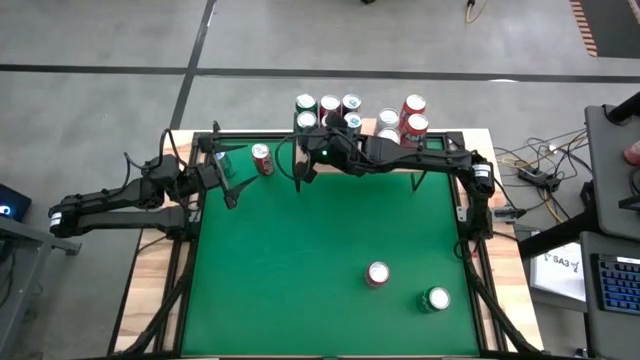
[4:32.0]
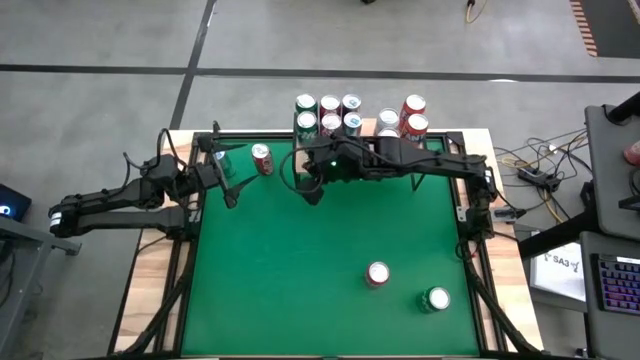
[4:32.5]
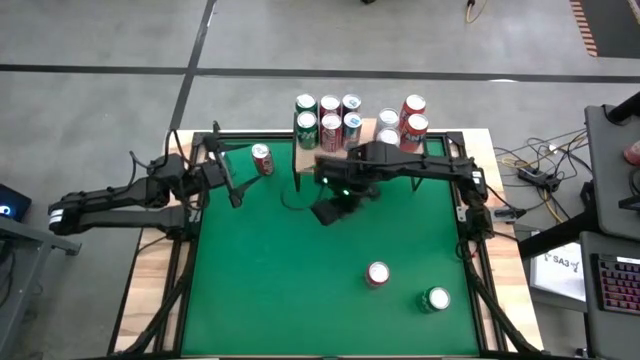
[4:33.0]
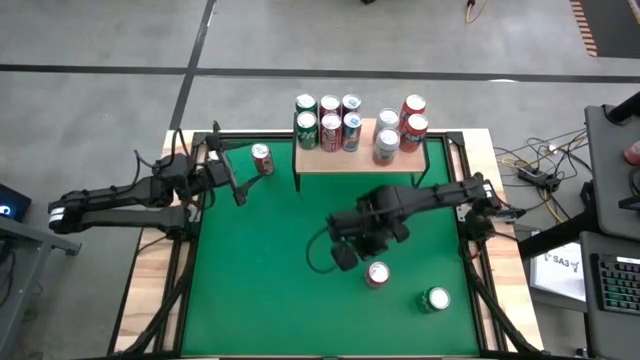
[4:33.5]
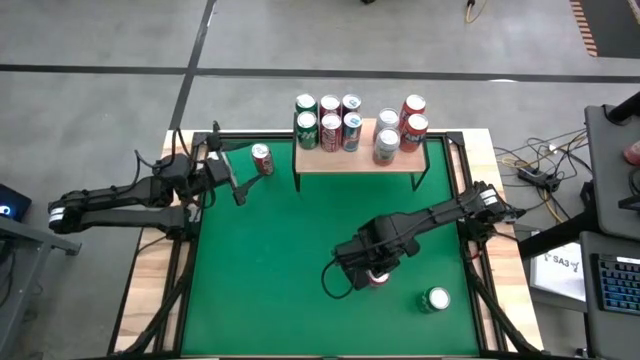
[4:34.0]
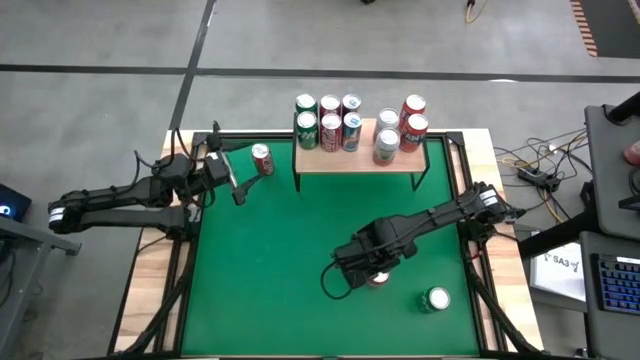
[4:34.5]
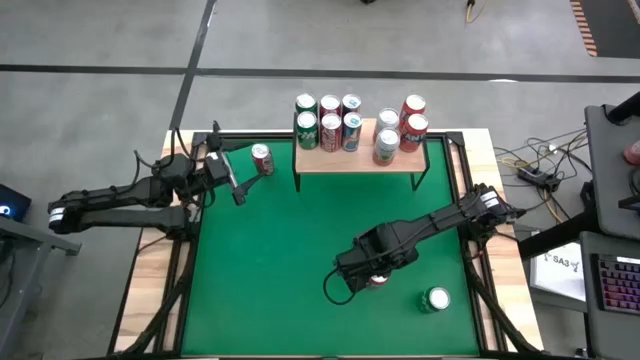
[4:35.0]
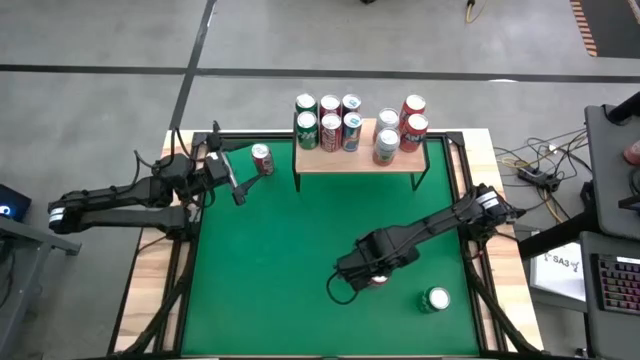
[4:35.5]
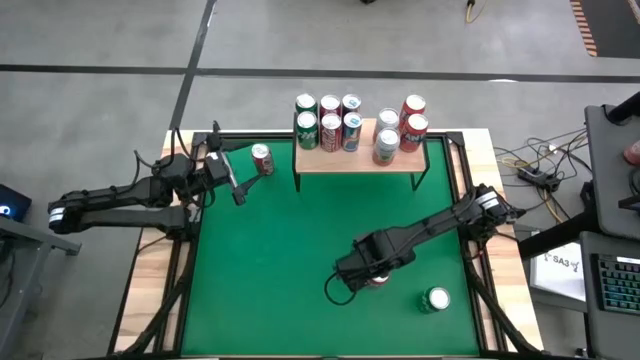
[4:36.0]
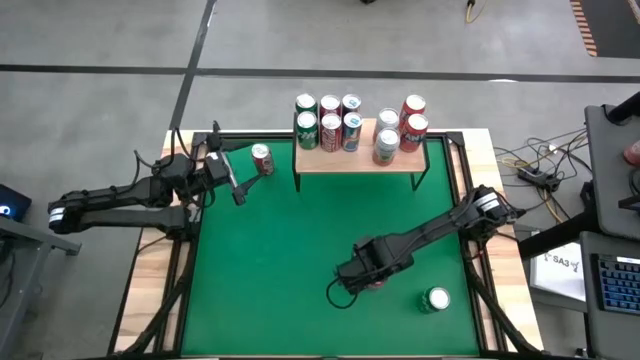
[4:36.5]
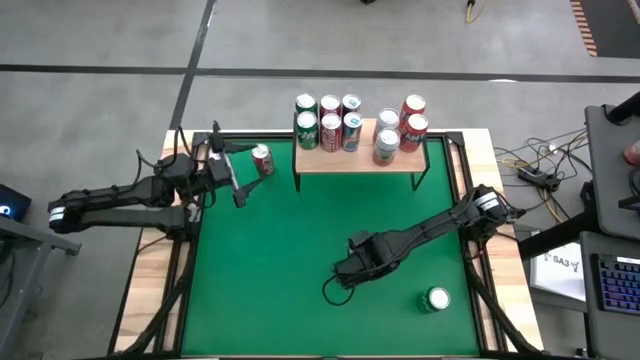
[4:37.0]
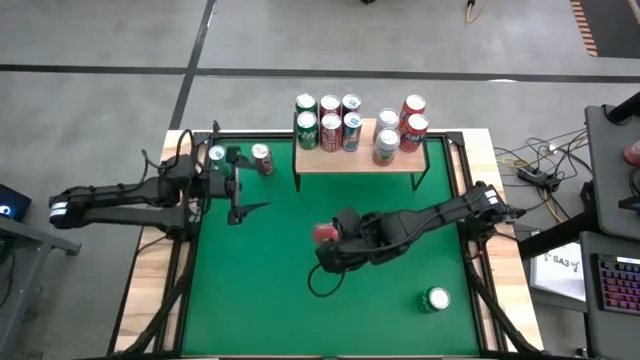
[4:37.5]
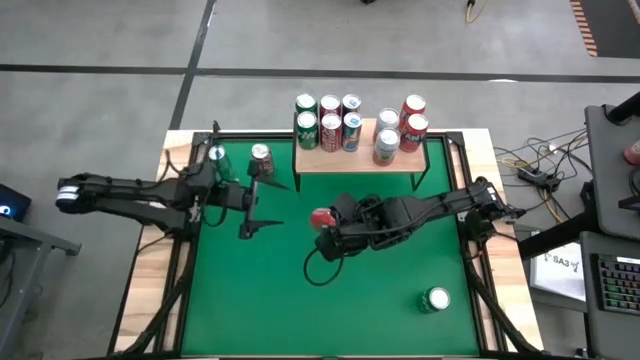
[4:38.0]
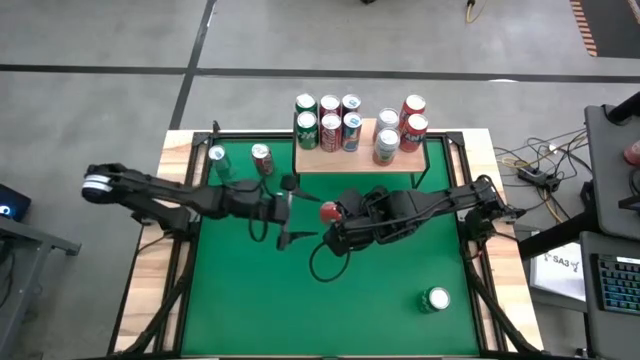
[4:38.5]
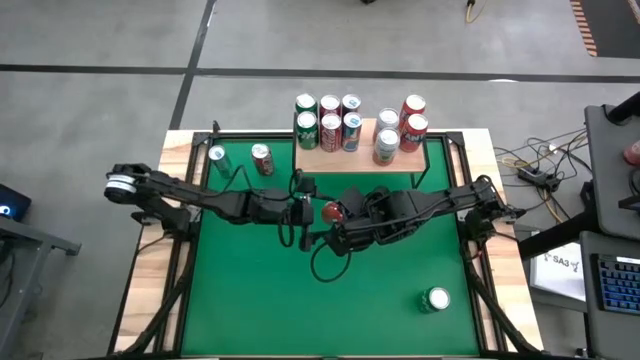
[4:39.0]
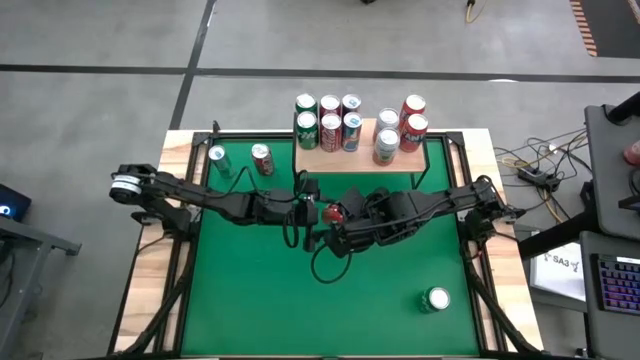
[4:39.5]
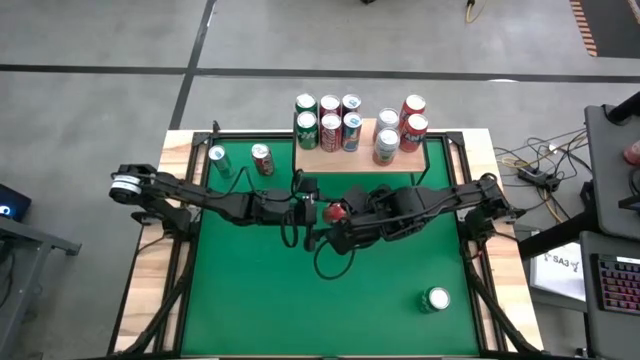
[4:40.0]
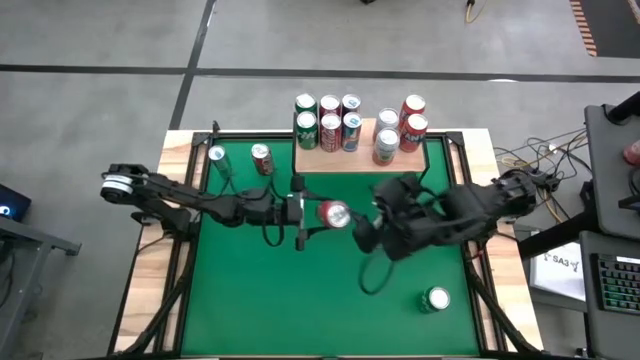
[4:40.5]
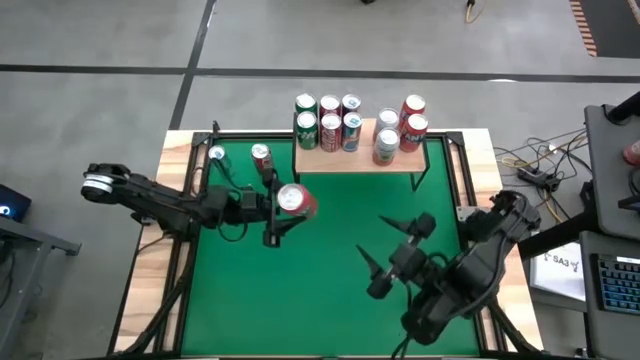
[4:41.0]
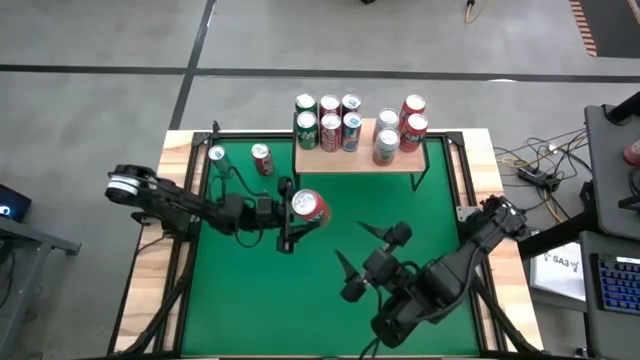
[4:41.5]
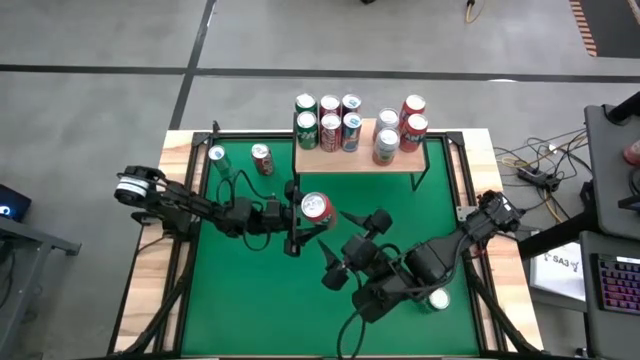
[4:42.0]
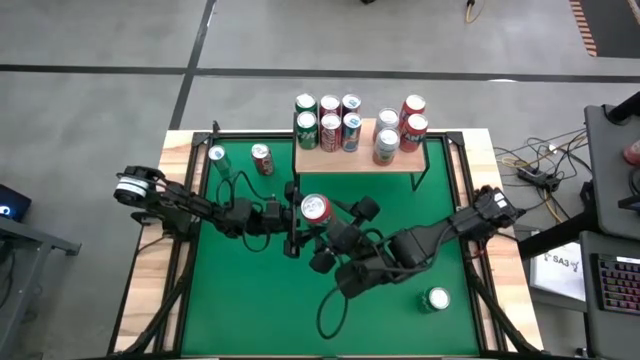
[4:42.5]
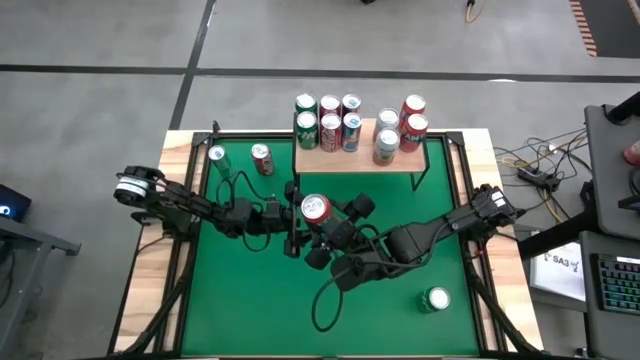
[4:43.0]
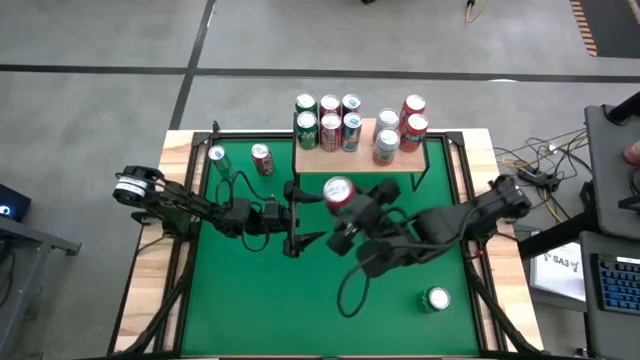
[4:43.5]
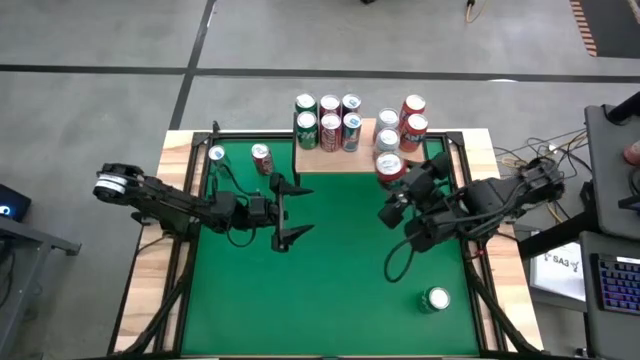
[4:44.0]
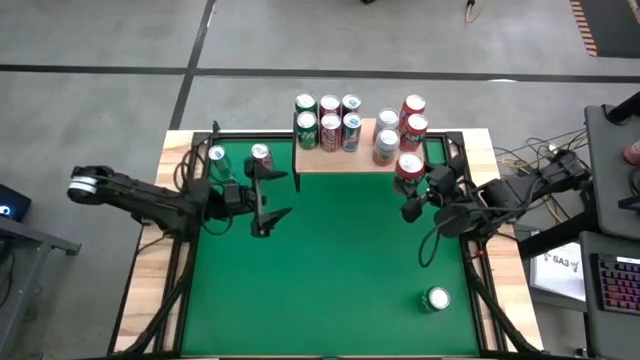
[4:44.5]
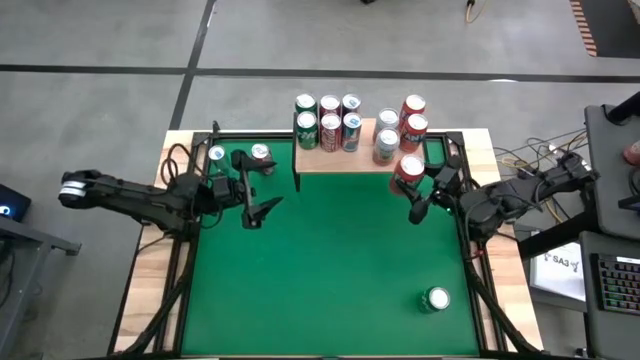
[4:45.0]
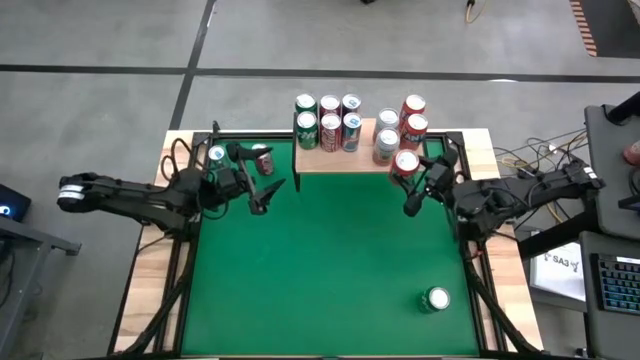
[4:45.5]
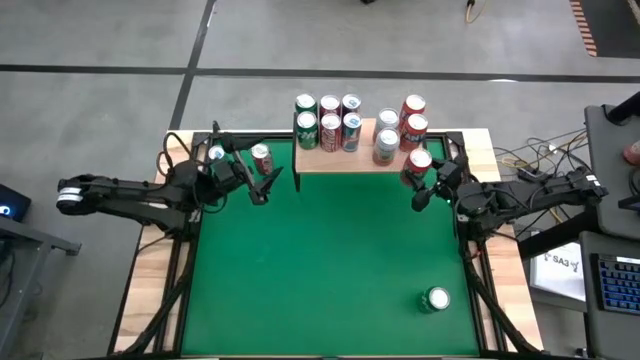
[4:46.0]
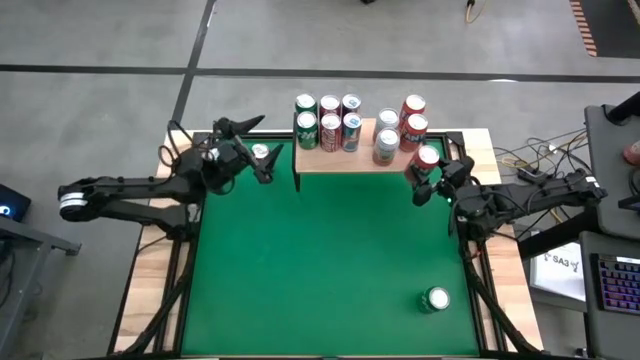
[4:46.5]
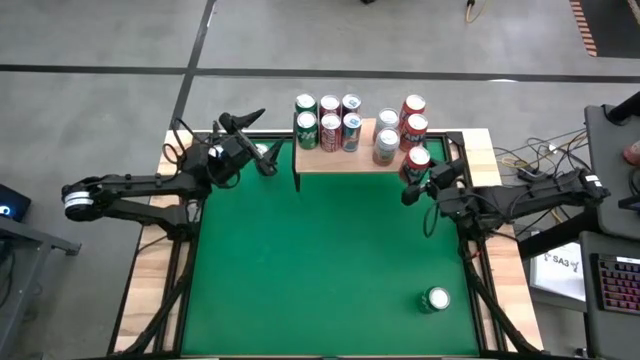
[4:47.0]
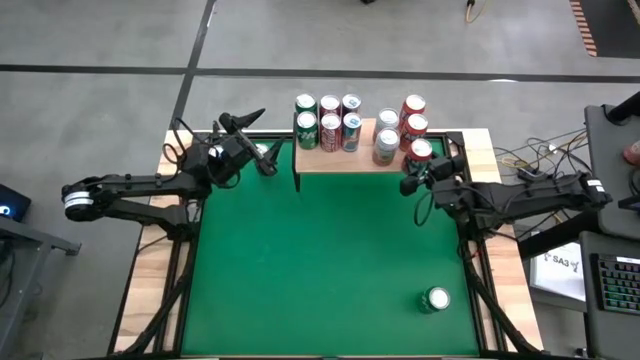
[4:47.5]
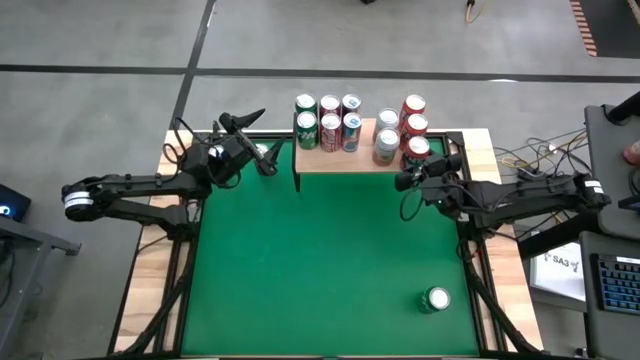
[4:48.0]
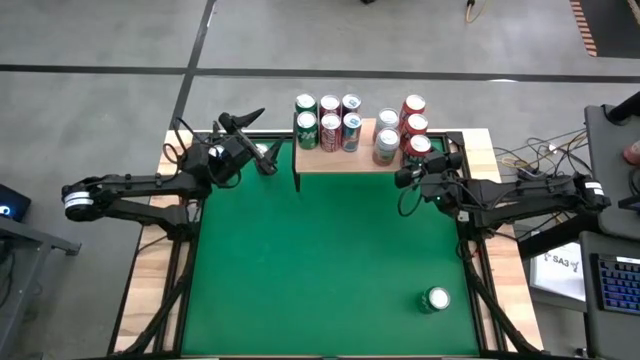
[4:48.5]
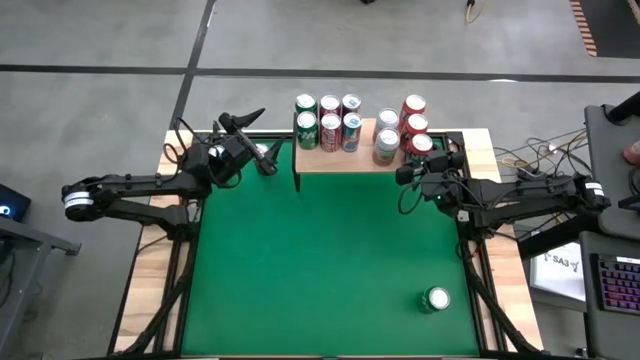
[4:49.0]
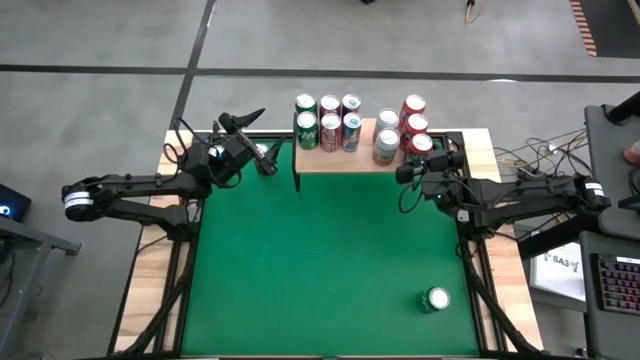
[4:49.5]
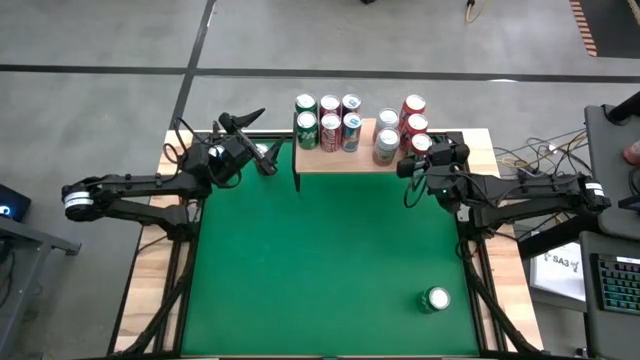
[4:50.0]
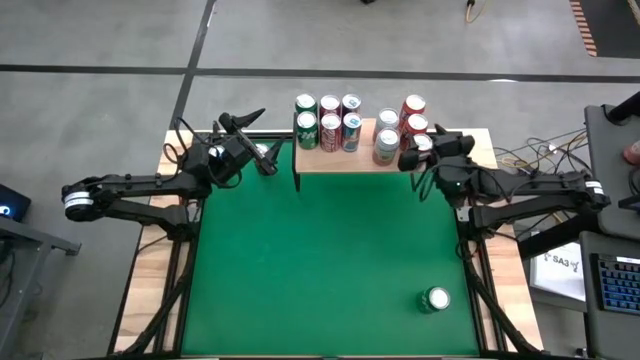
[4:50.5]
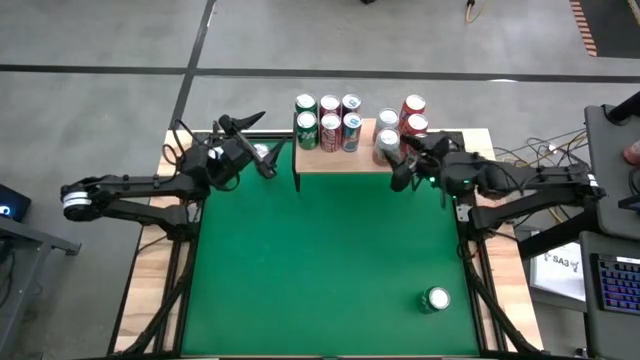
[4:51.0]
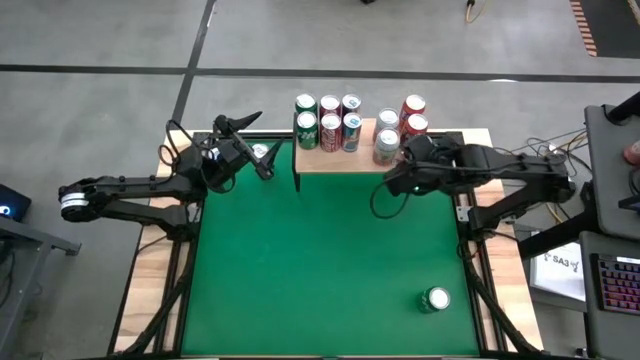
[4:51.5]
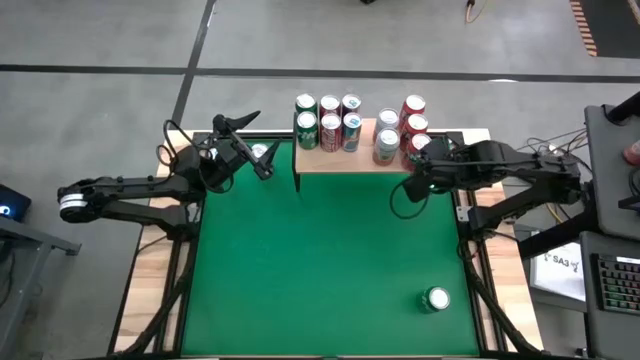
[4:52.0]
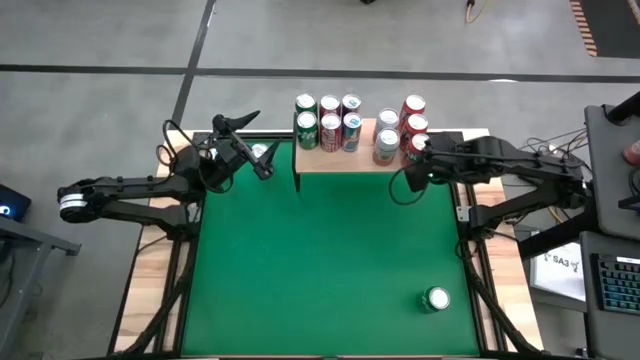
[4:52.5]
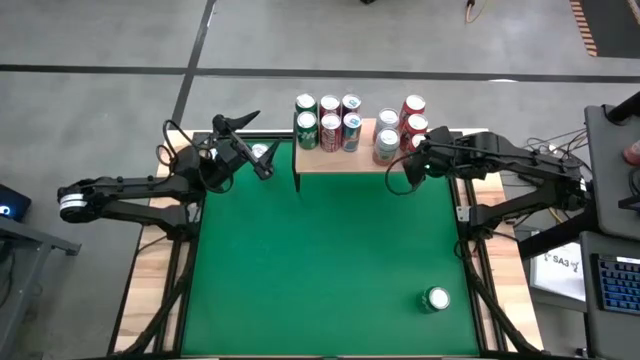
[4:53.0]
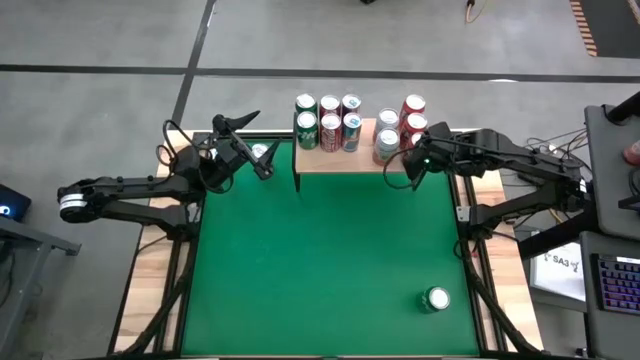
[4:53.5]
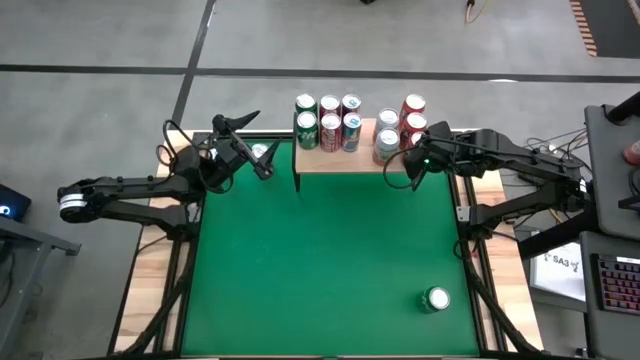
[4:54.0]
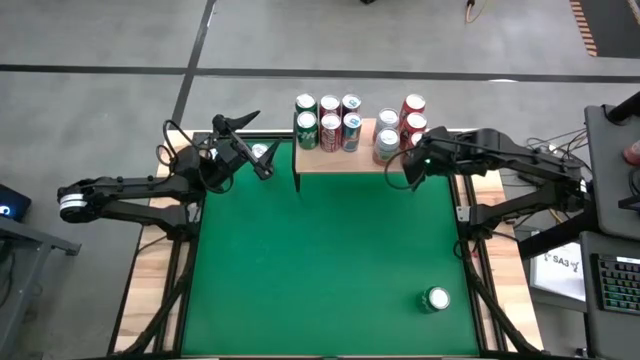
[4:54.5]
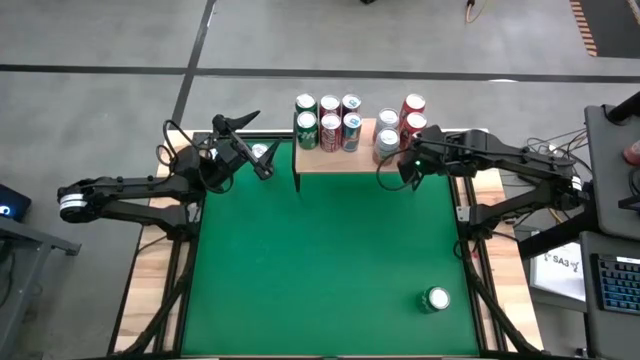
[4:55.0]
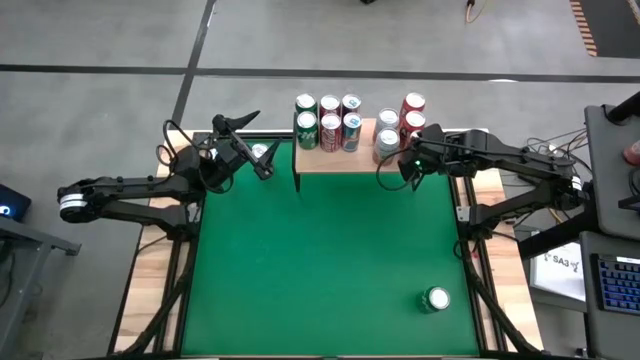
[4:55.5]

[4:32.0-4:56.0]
Task: Place canned beverage on shelf
Put the red soda can aligned with the red soda can on the shelf
